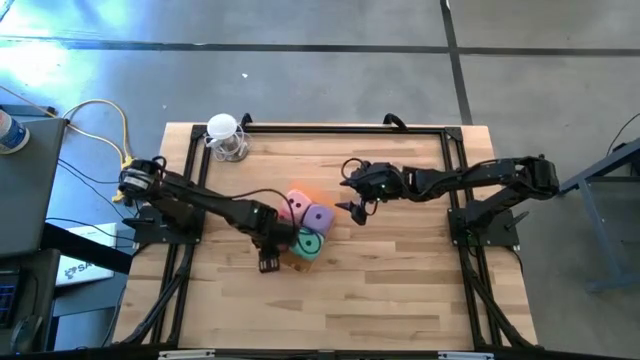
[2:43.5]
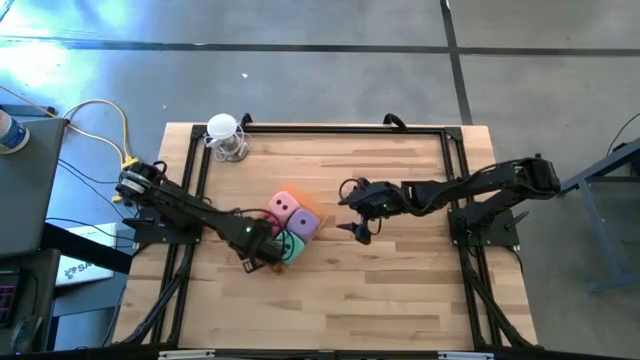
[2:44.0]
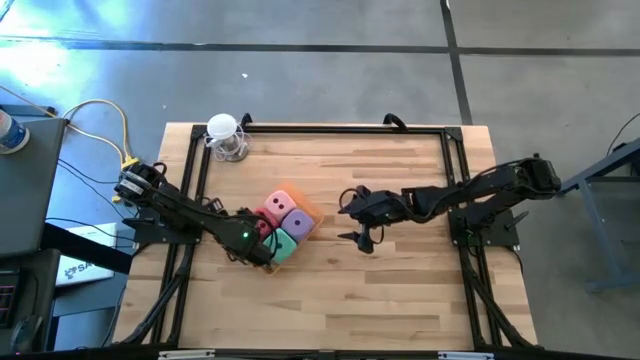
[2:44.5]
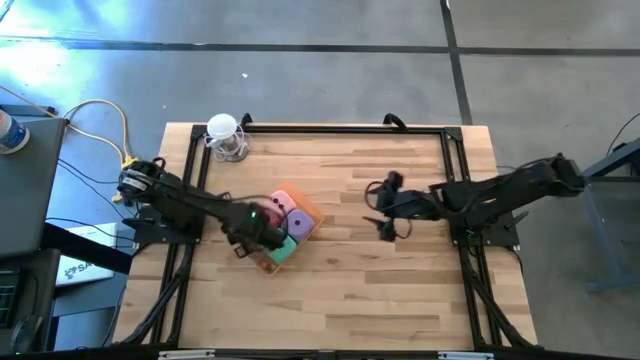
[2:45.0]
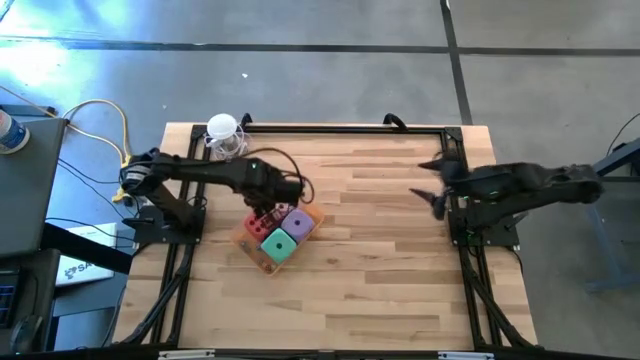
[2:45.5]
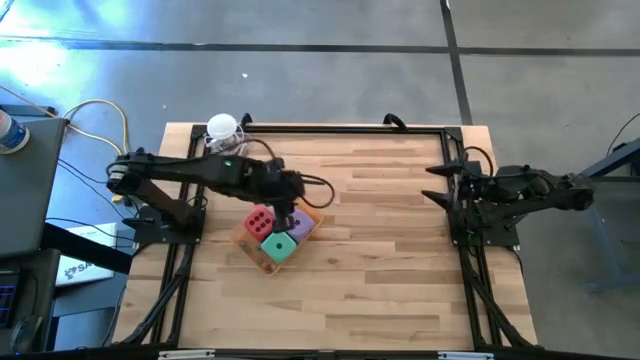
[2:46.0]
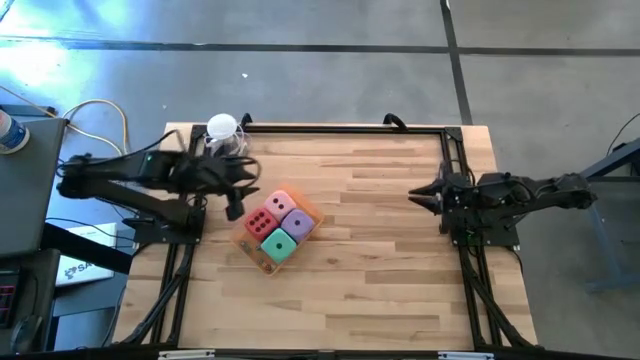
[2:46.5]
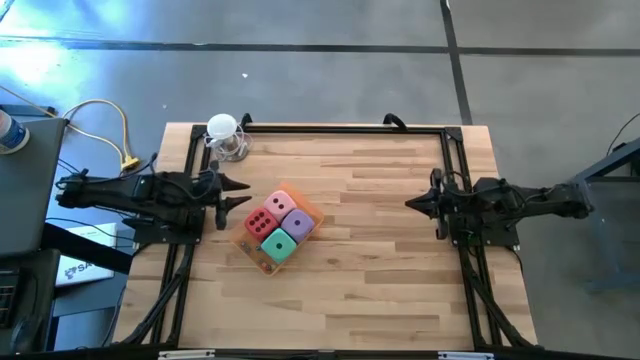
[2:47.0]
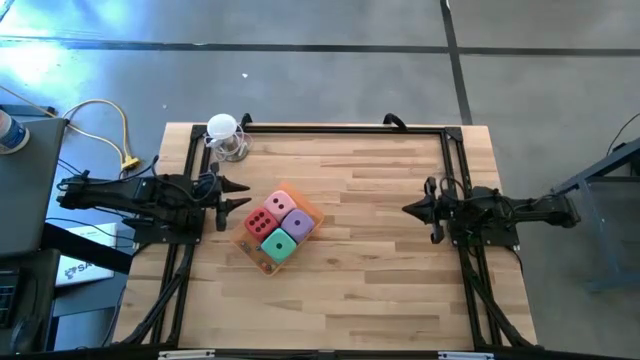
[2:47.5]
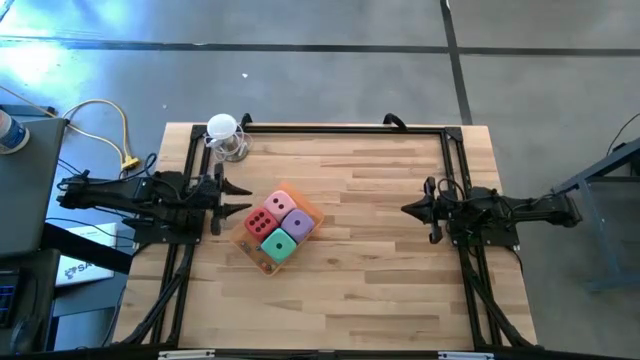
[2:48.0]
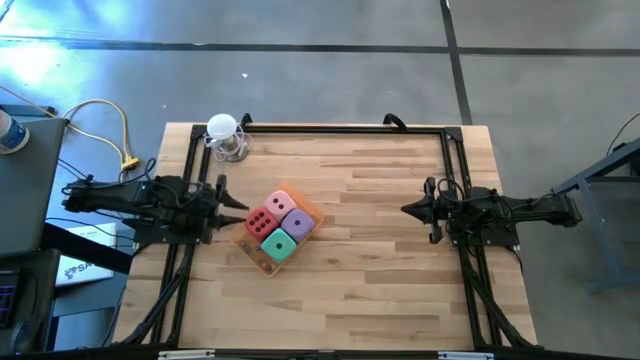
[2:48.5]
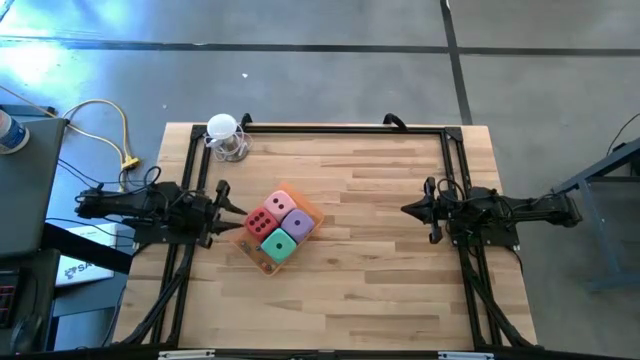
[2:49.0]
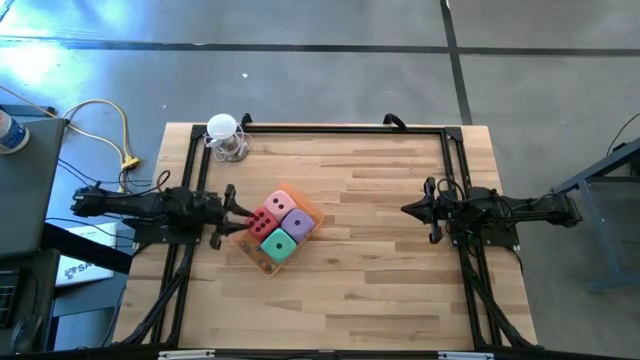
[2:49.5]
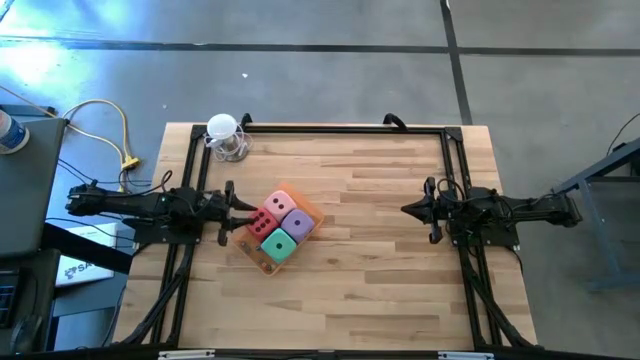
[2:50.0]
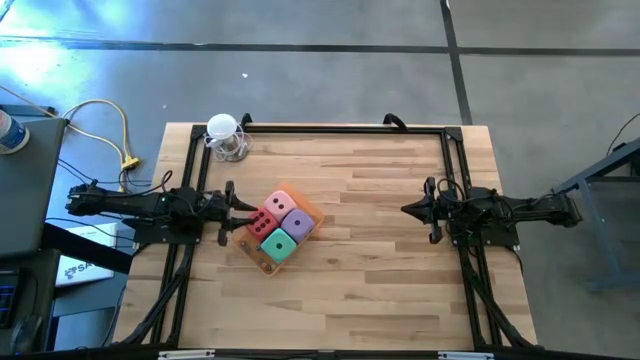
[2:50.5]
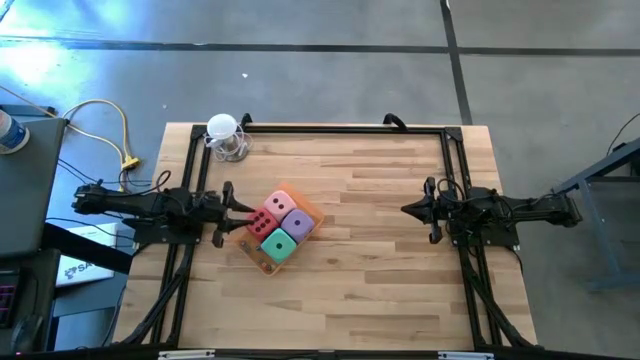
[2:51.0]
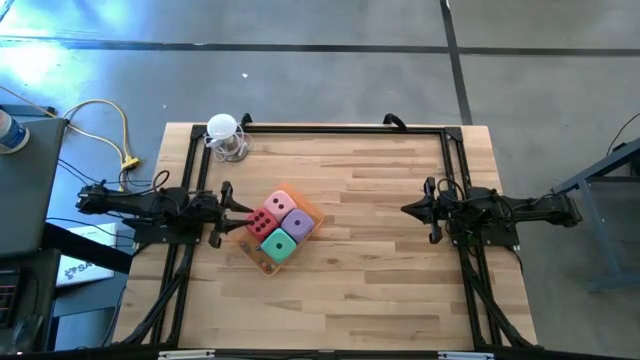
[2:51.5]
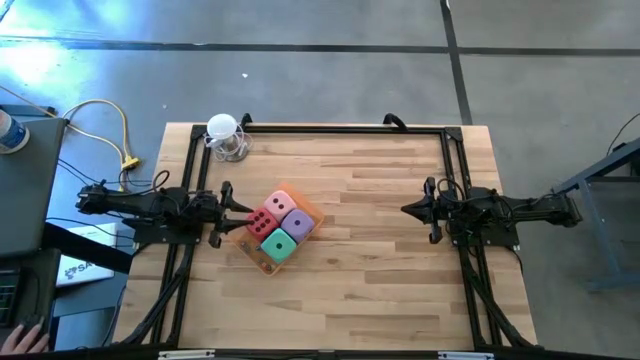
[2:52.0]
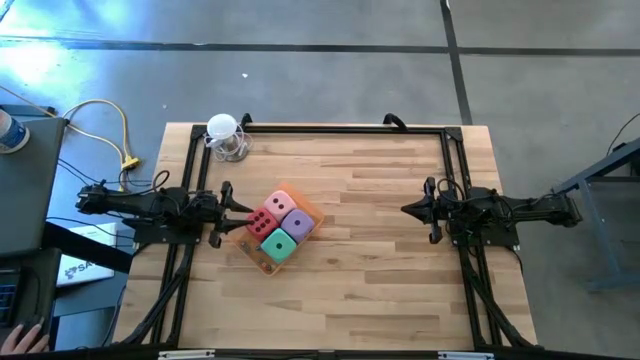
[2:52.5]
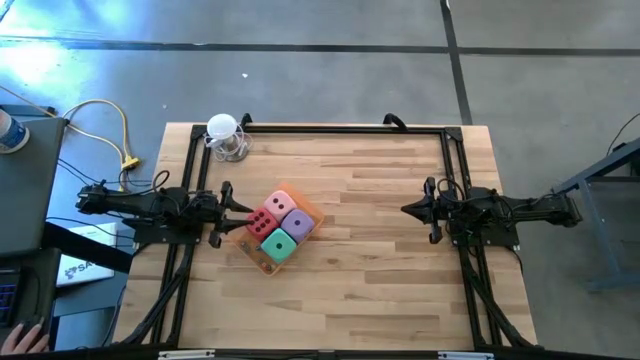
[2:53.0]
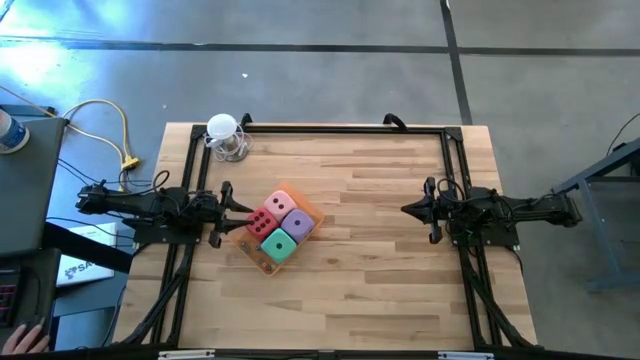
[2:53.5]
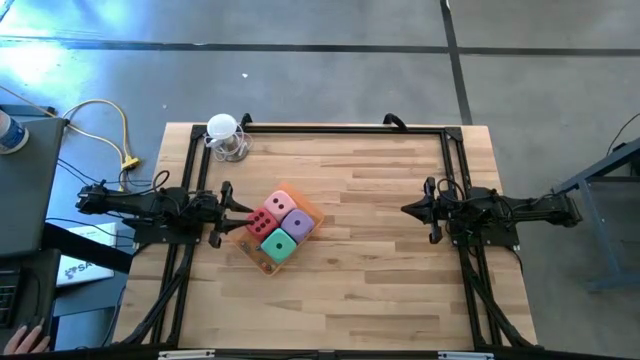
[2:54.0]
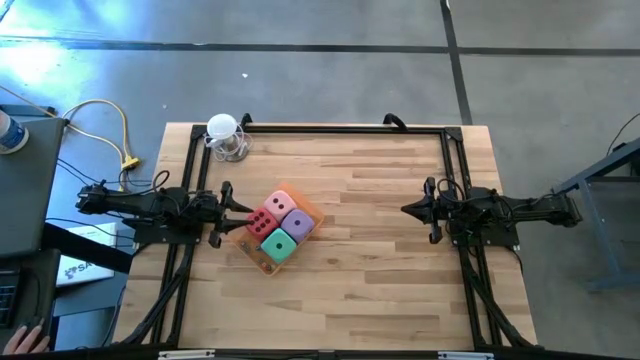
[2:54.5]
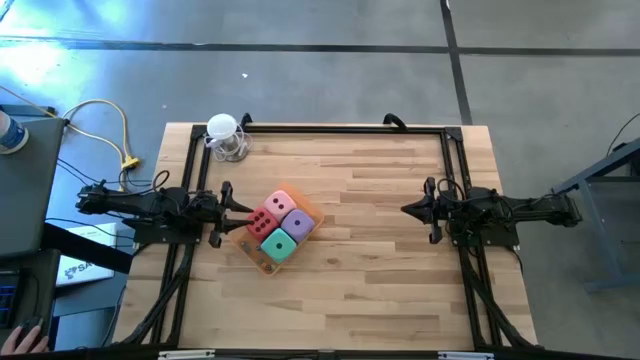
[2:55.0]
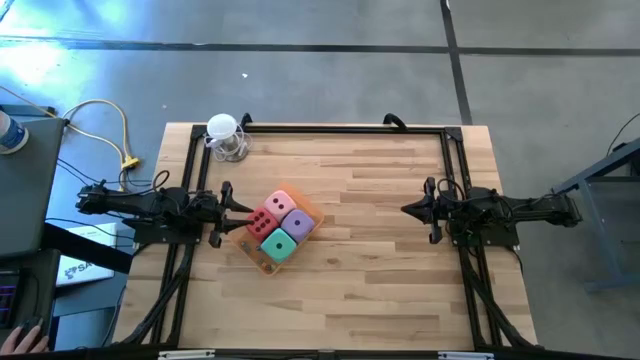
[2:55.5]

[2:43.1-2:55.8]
Task: Pick & Place Dice
Return to Home Position

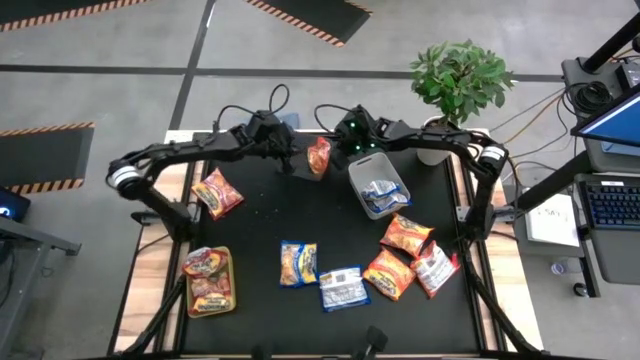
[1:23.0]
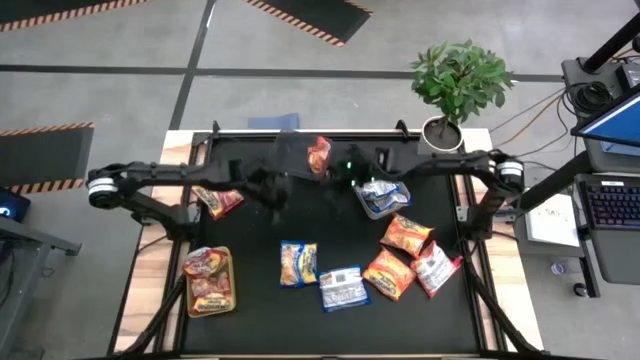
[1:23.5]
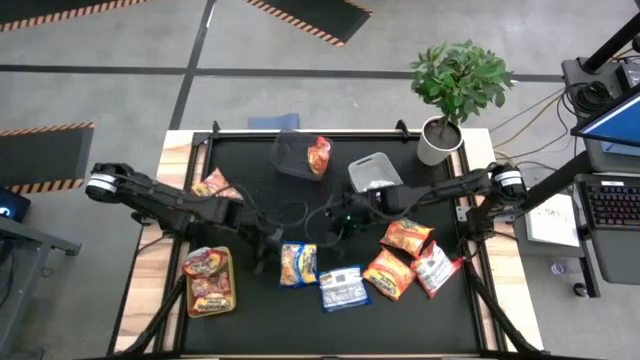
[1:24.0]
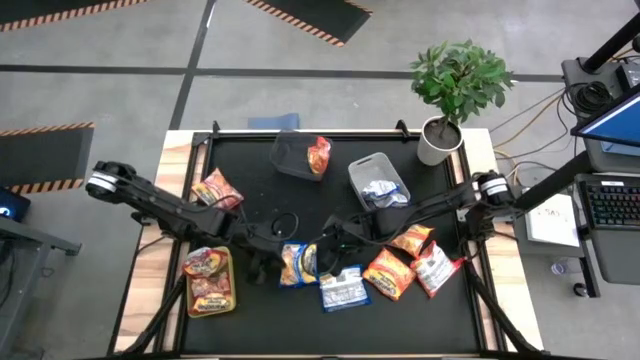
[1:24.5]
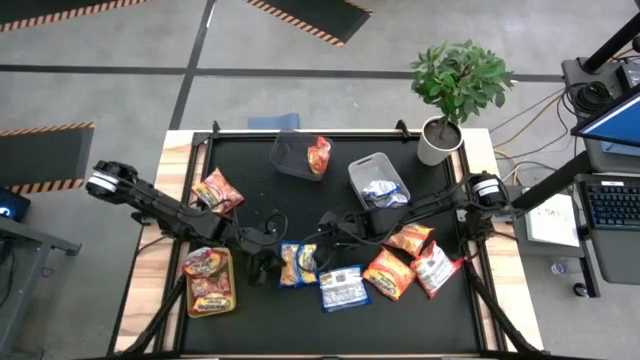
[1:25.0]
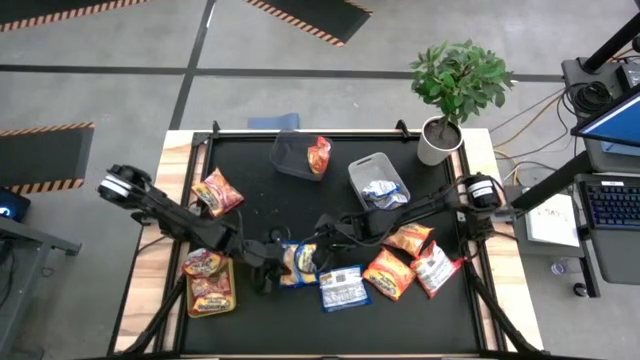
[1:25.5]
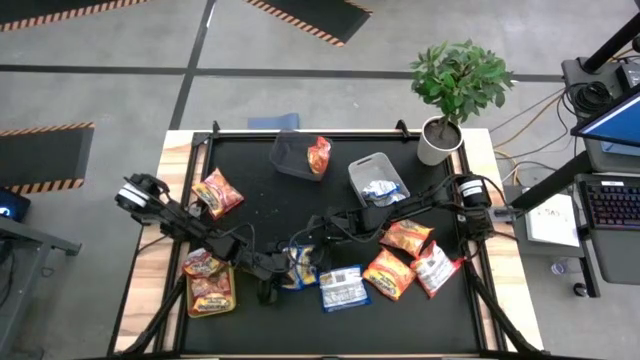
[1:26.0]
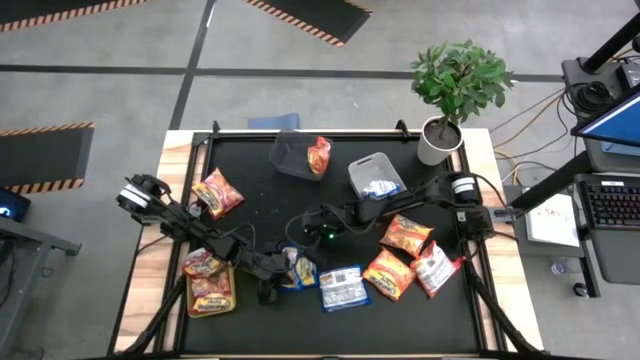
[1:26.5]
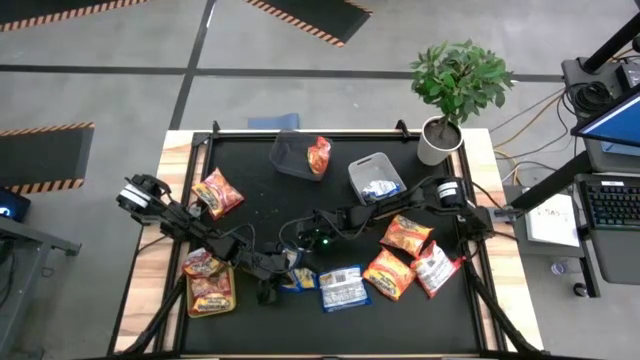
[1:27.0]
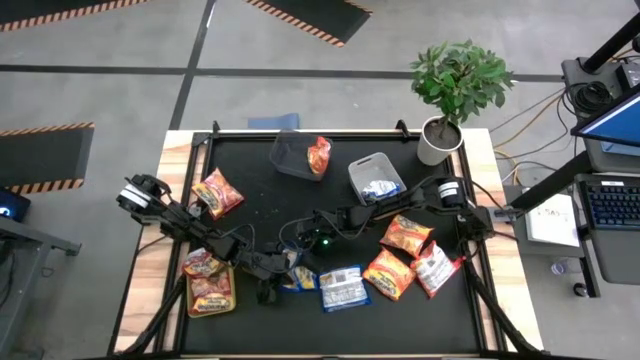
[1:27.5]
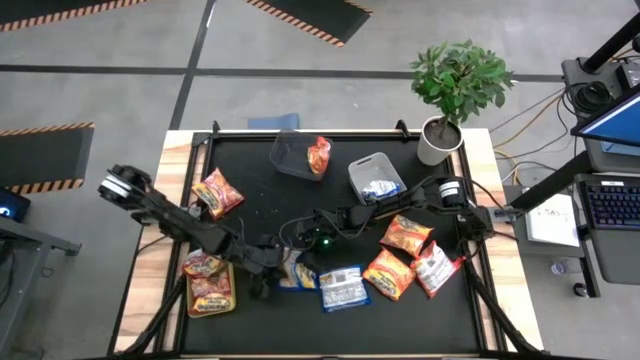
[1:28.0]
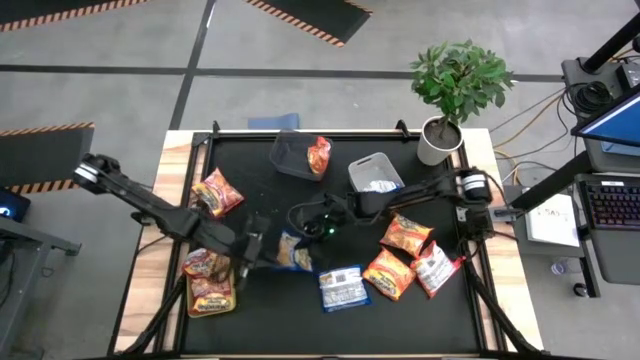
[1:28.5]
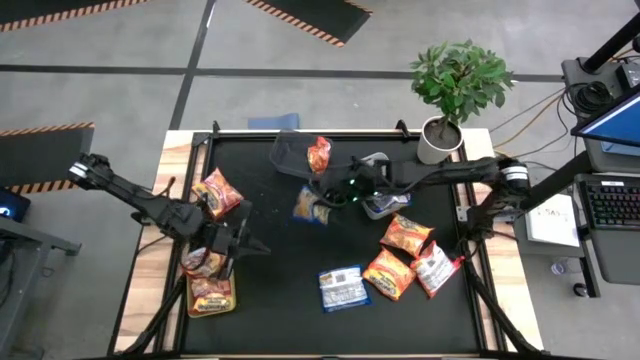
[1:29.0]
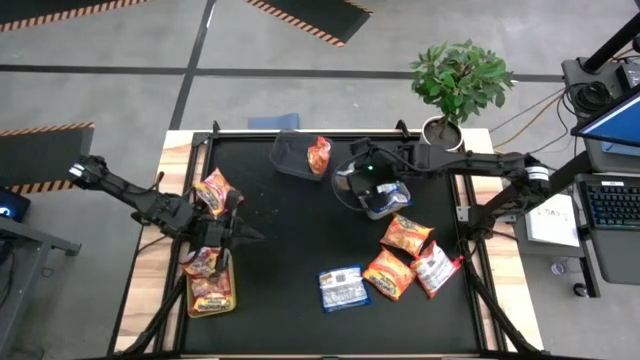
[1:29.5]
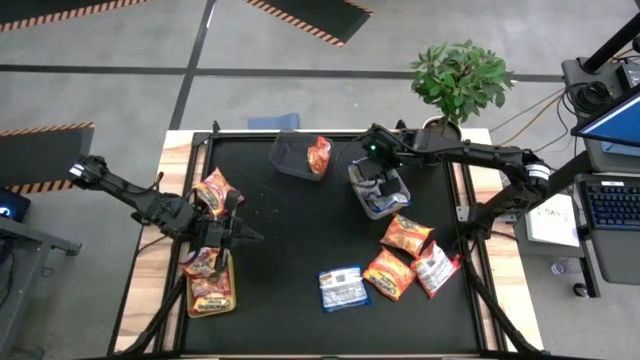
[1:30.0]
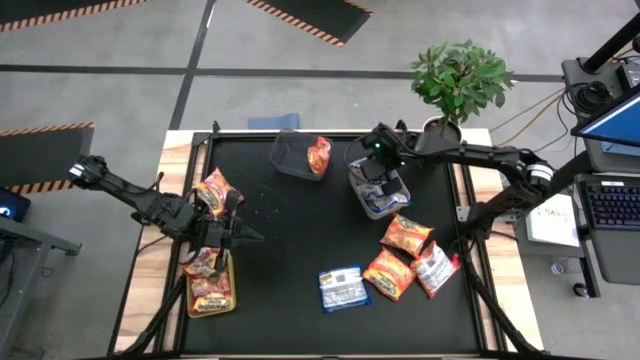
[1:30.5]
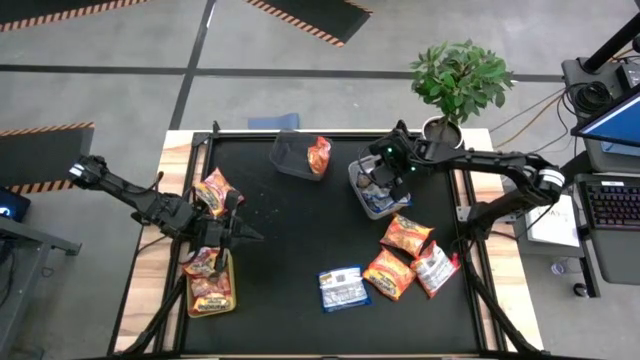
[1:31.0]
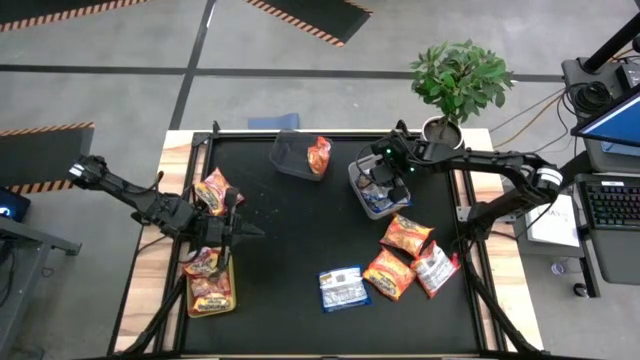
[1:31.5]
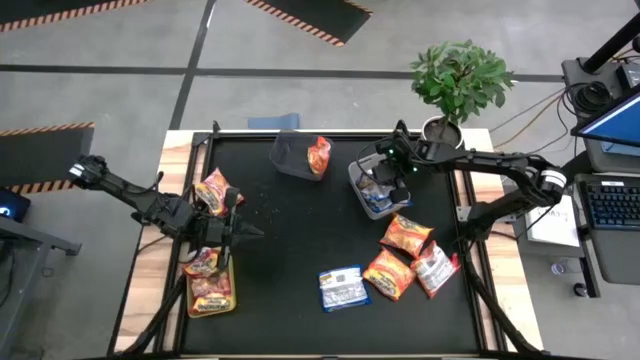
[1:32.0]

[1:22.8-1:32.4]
Task: Sort Maruchan noodles
Put the blue noodle back into the white bin
